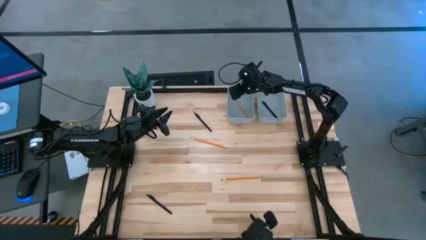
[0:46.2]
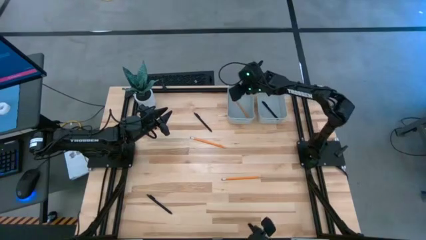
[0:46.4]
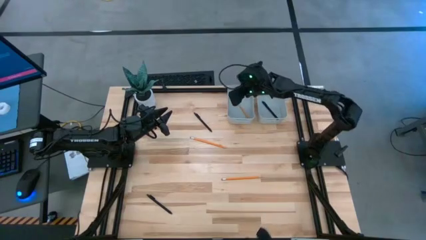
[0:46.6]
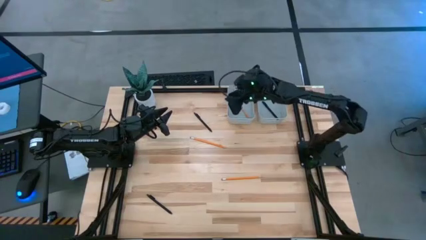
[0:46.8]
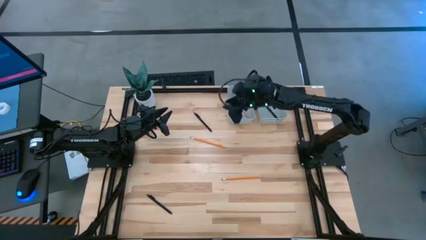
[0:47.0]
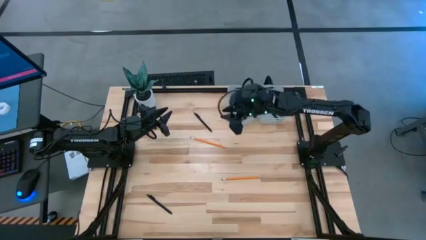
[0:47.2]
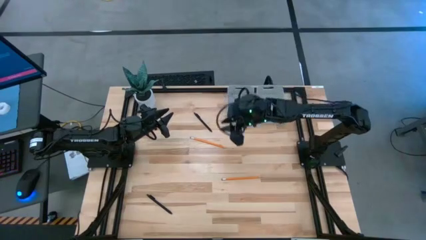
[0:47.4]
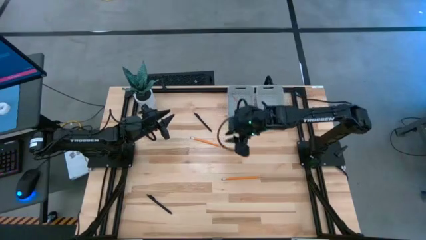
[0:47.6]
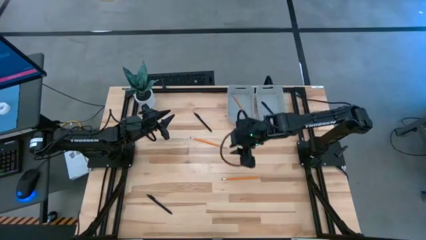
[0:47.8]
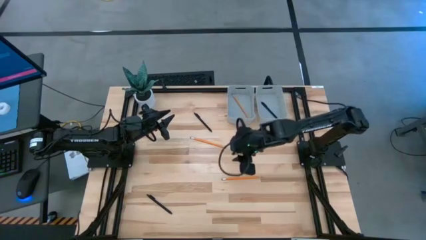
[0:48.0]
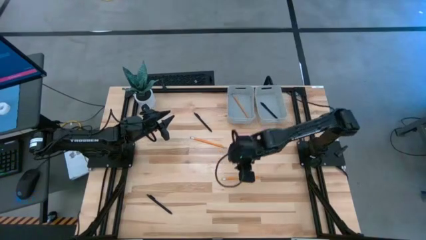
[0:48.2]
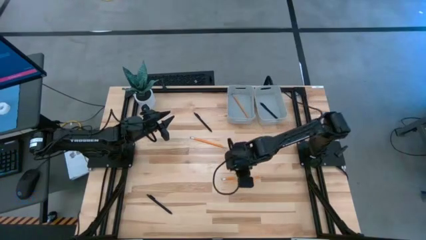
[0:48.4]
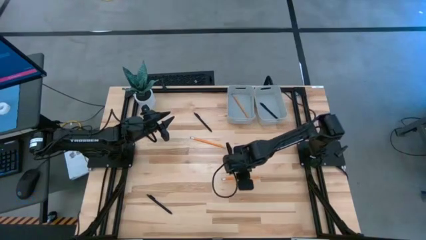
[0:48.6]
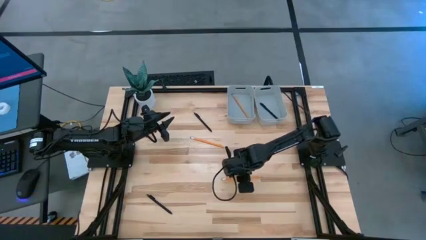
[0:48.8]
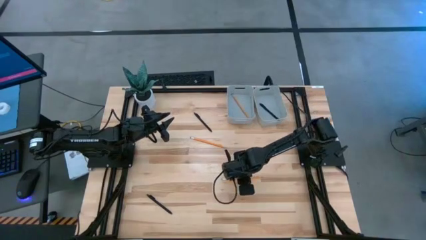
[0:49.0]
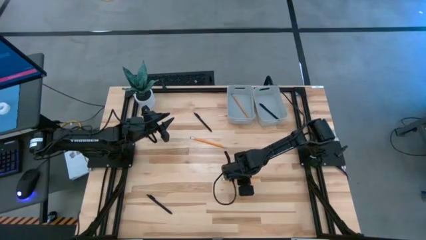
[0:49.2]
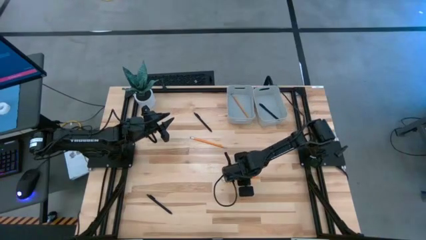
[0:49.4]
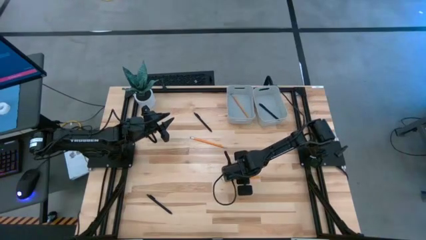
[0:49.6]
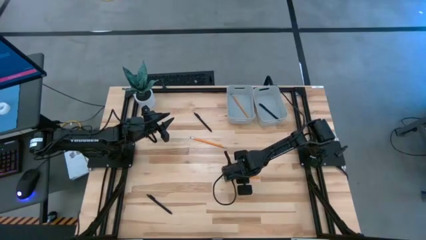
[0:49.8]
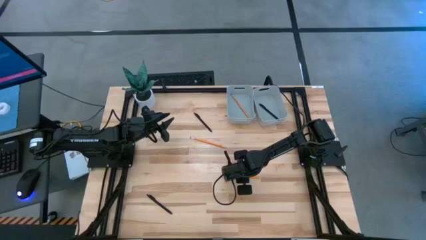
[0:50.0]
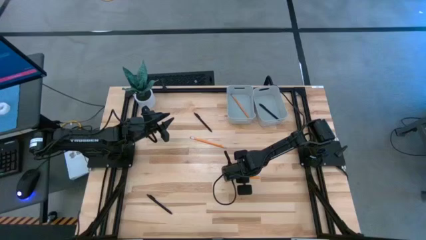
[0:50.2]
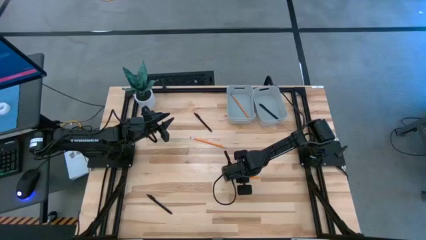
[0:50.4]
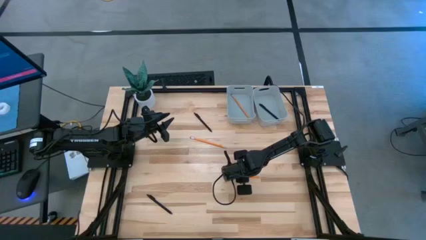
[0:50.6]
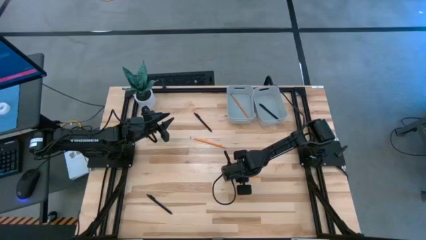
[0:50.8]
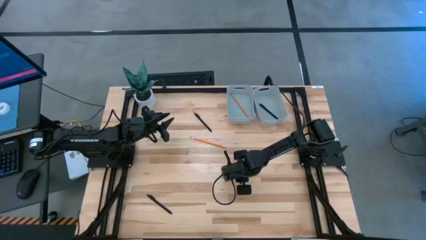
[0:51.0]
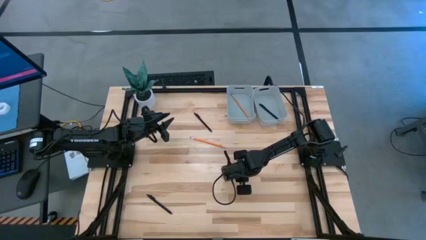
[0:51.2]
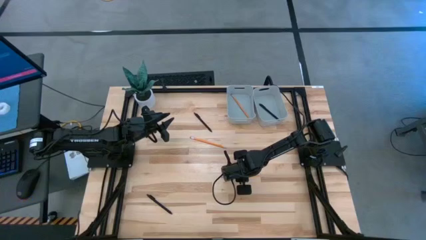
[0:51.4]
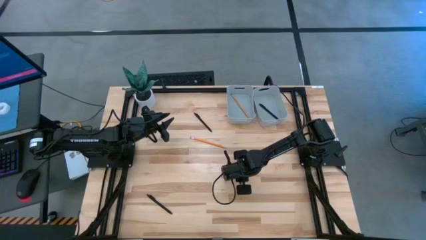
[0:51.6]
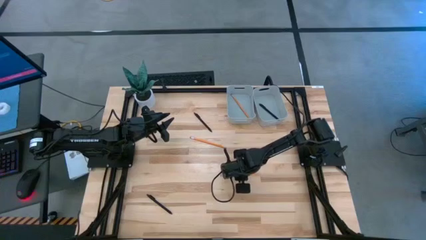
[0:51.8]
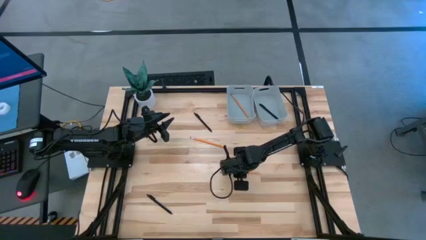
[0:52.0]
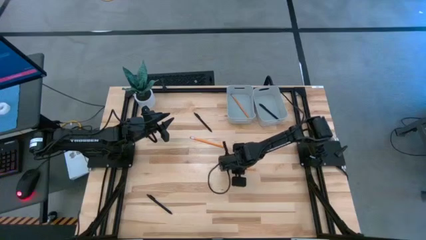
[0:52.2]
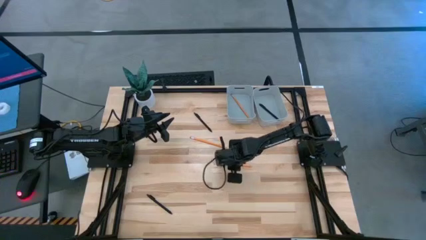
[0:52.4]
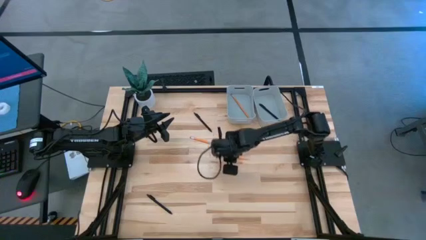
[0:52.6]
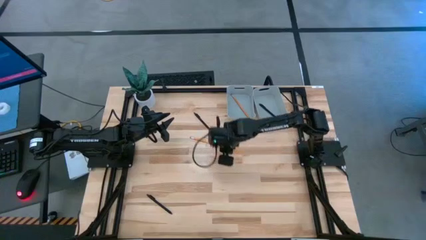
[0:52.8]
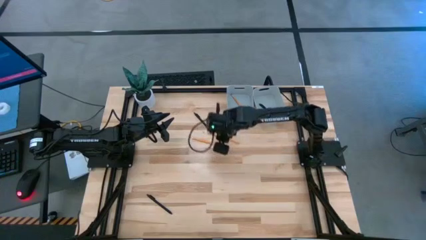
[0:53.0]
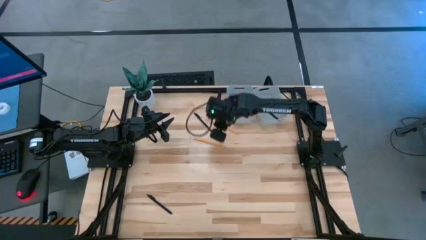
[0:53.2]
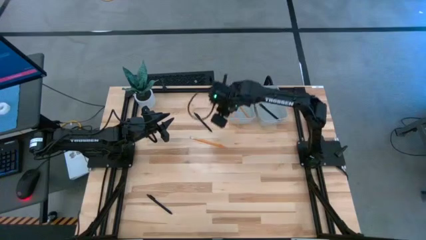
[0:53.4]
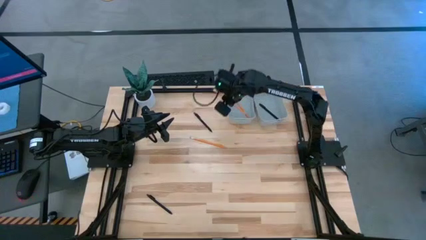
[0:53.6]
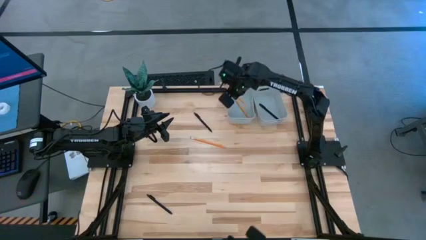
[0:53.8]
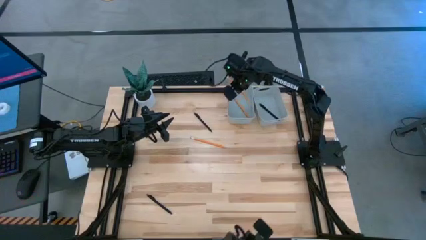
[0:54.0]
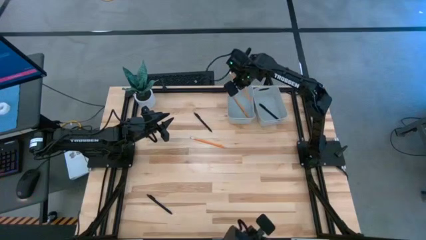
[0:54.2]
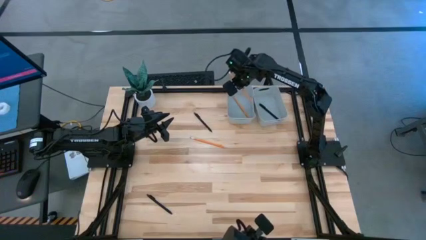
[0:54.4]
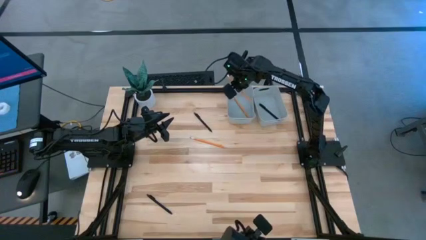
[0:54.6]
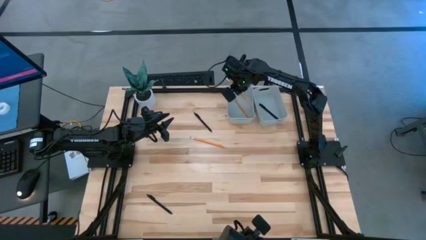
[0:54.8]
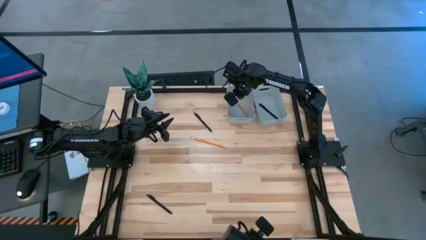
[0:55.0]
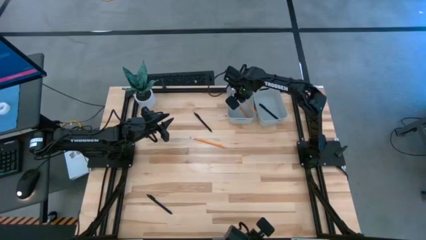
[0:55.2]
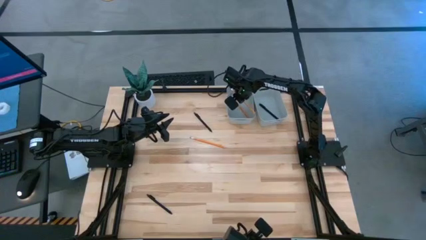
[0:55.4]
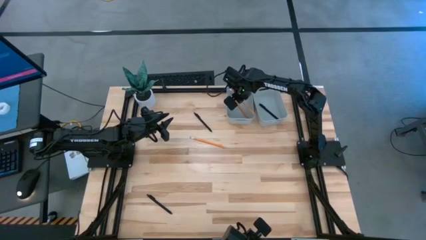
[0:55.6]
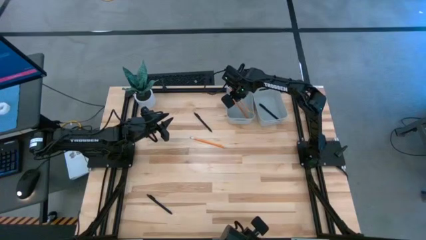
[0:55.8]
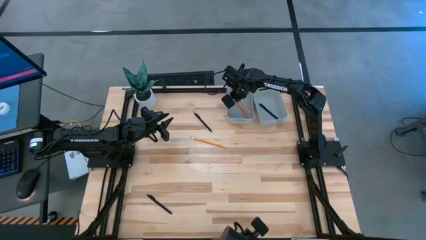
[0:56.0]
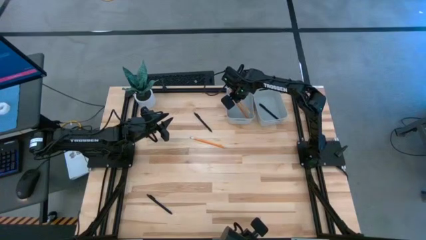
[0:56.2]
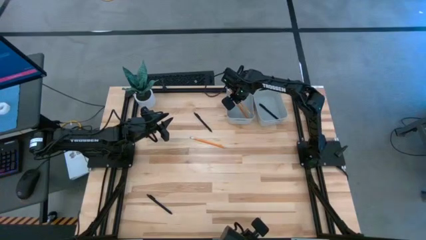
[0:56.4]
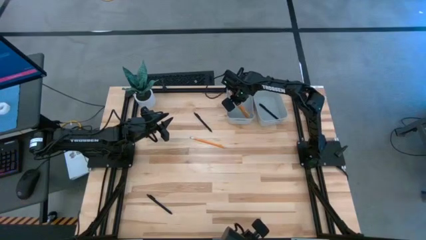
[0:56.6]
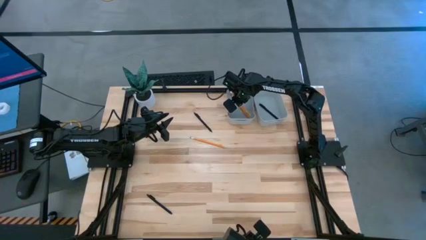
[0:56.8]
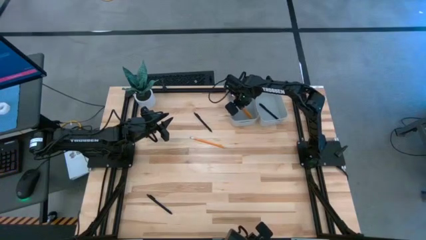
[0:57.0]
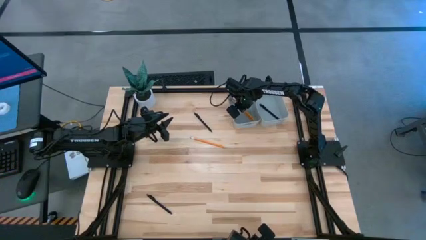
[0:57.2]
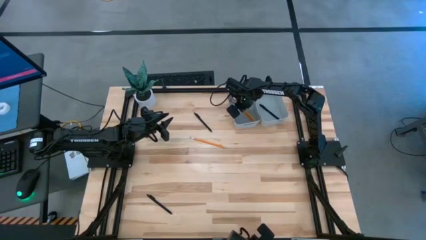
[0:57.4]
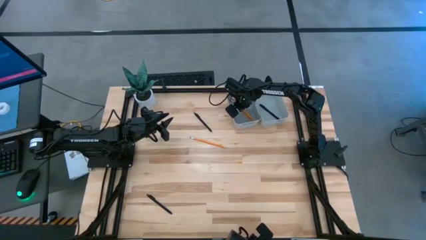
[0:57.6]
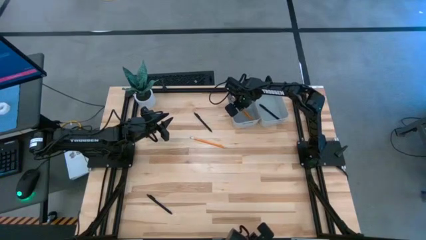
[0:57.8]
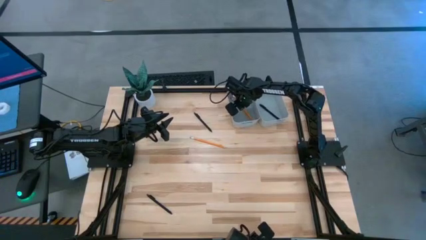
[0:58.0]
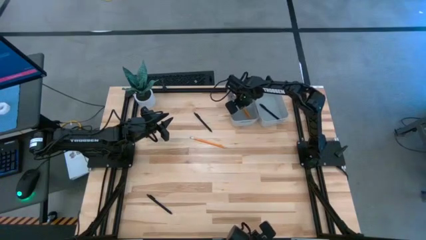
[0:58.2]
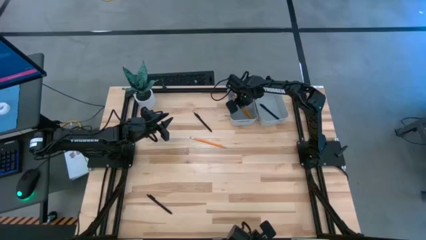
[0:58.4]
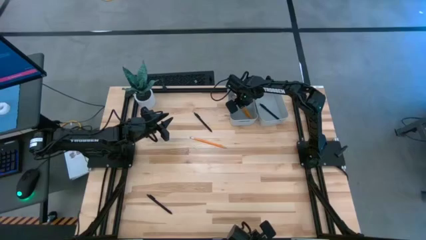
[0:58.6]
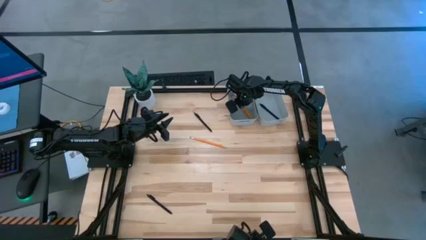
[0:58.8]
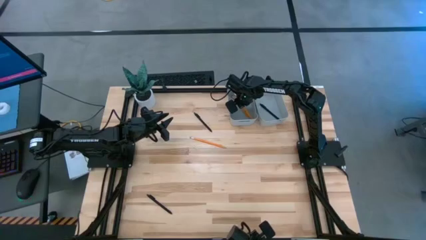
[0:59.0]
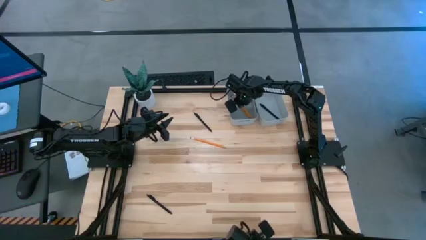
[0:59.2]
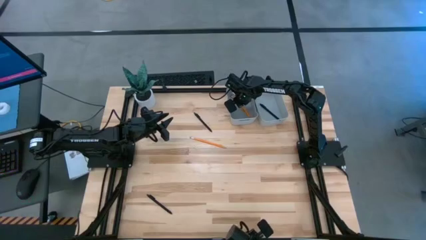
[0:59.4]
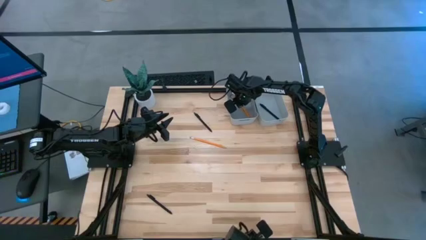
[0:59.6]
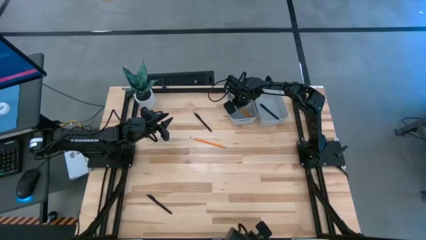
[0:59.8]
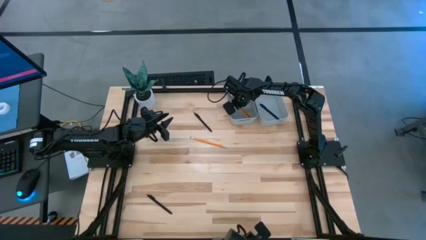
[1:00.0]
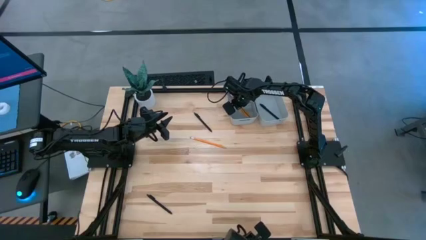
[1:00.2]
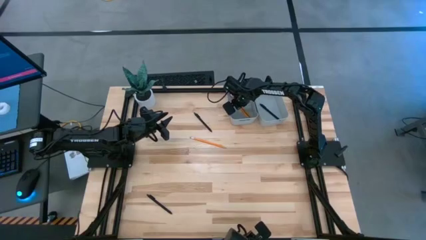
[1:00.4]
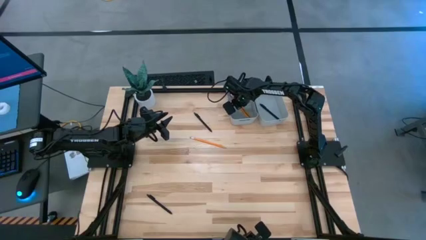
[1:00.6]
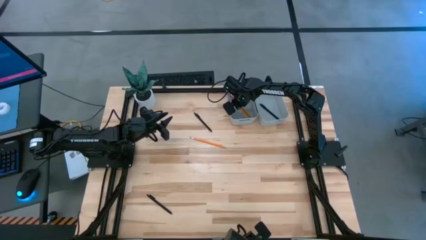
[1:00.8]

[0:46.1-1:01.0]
Task: Sort pens & pencils
Put the bottom yellow pencil into the left gray bin
